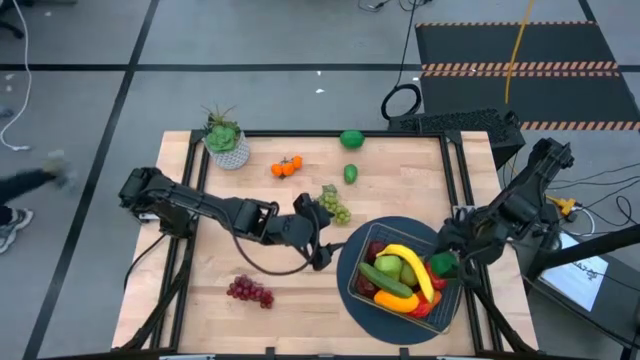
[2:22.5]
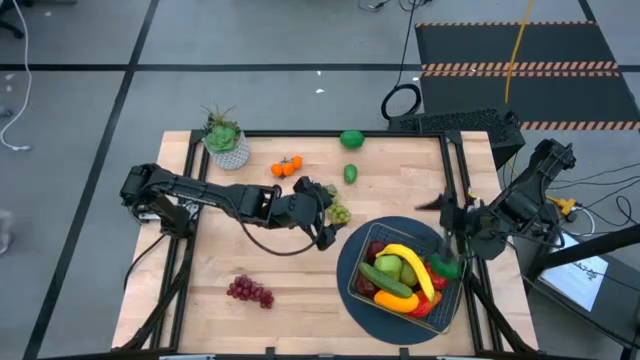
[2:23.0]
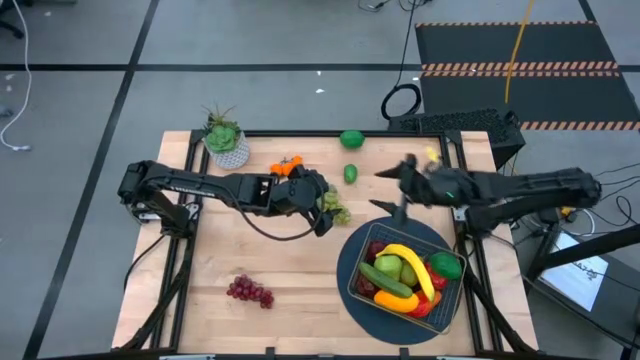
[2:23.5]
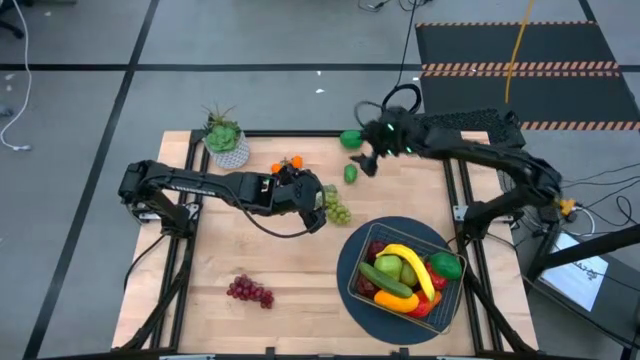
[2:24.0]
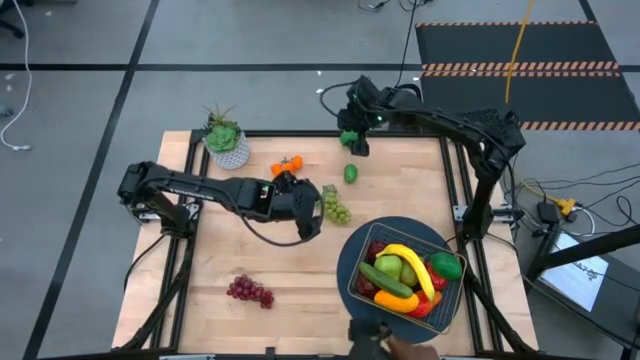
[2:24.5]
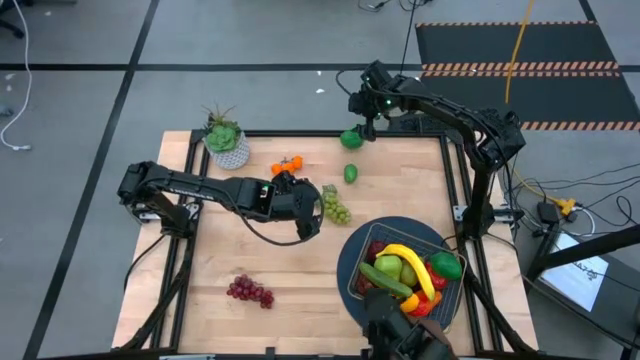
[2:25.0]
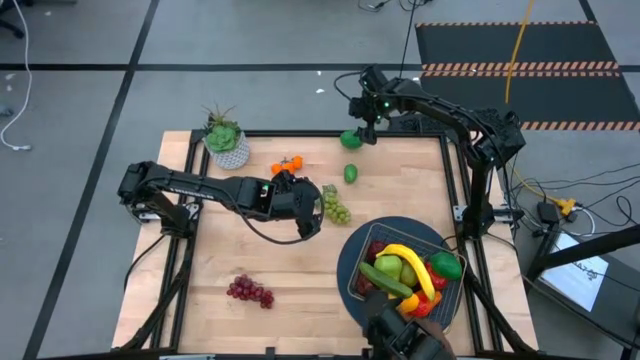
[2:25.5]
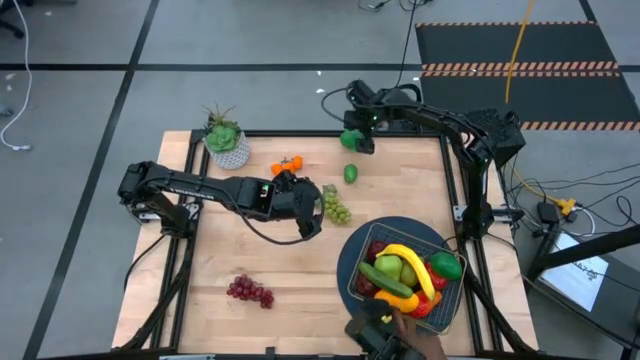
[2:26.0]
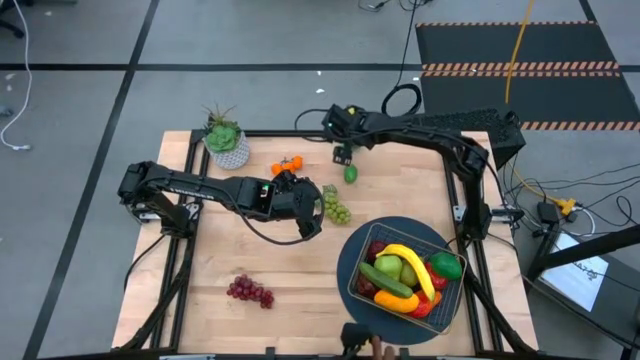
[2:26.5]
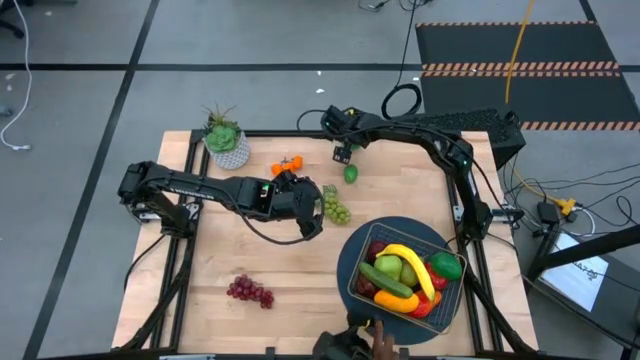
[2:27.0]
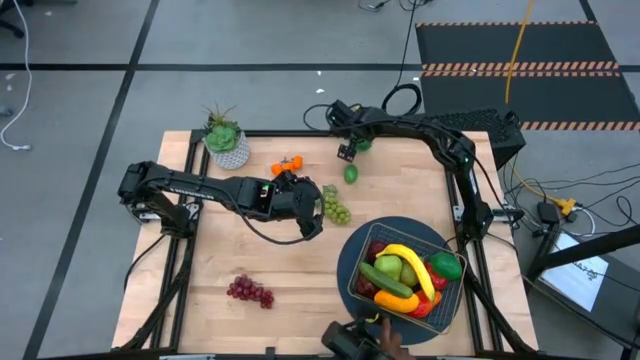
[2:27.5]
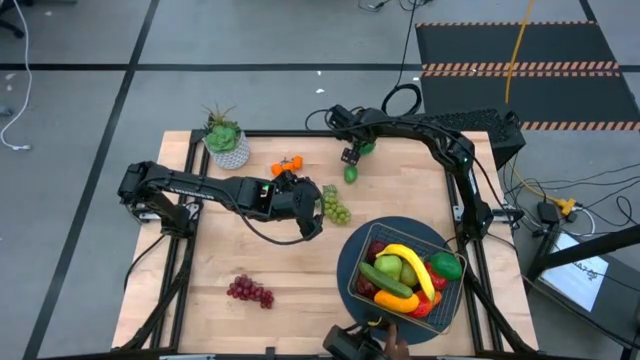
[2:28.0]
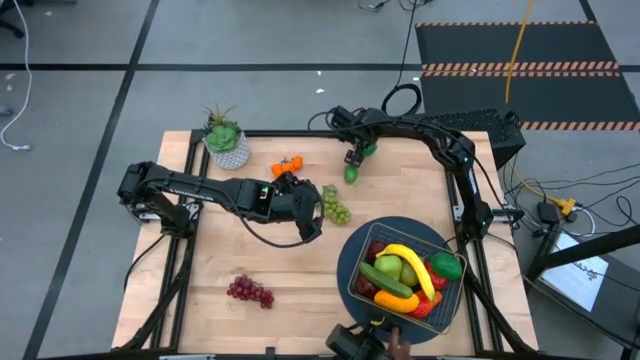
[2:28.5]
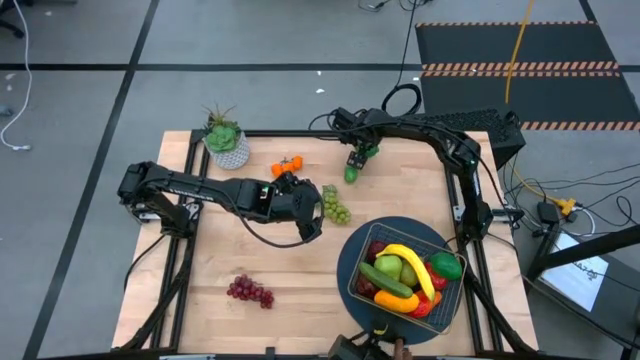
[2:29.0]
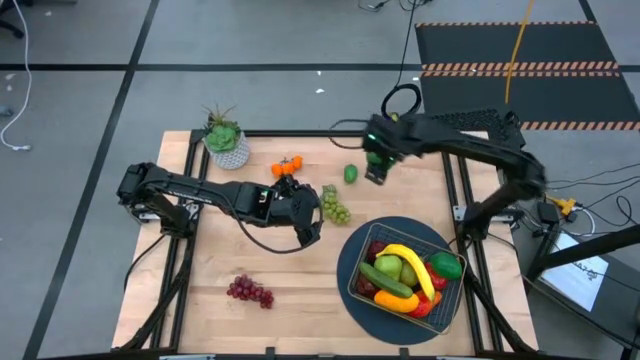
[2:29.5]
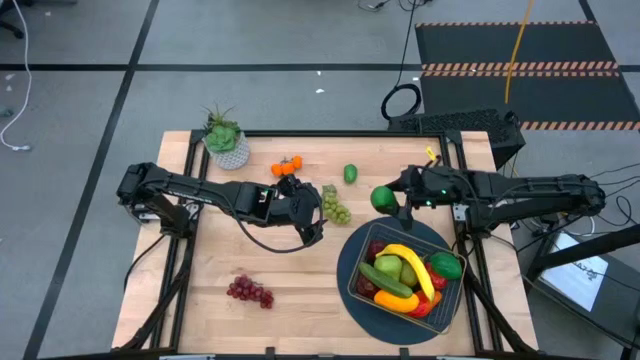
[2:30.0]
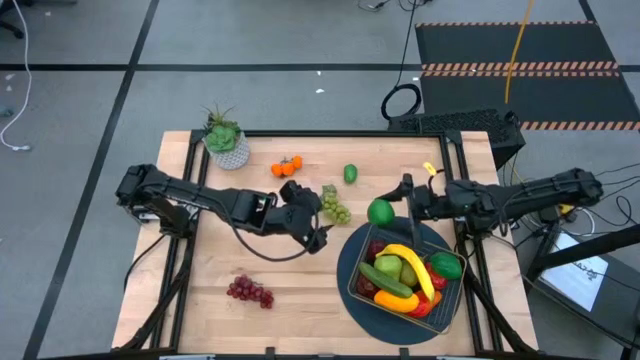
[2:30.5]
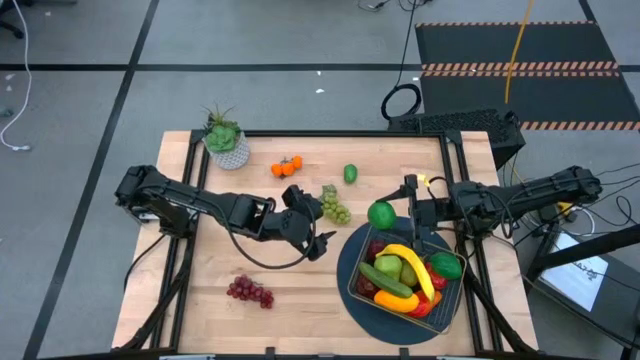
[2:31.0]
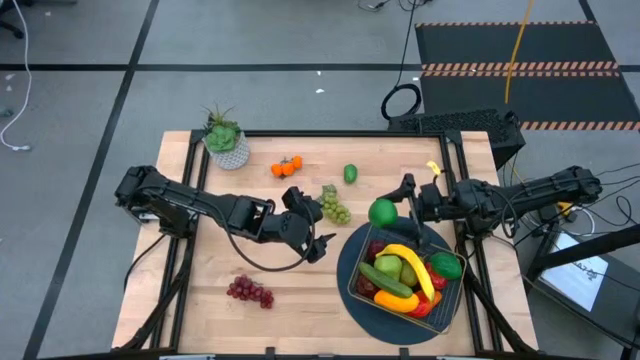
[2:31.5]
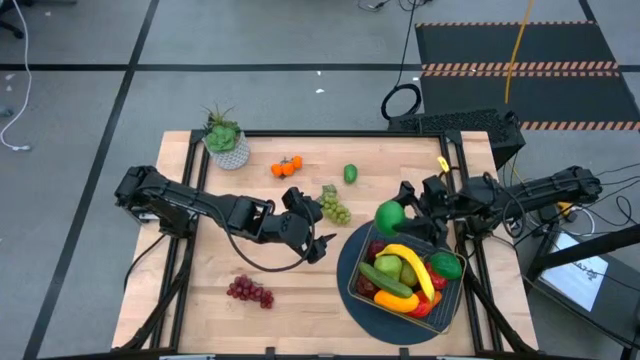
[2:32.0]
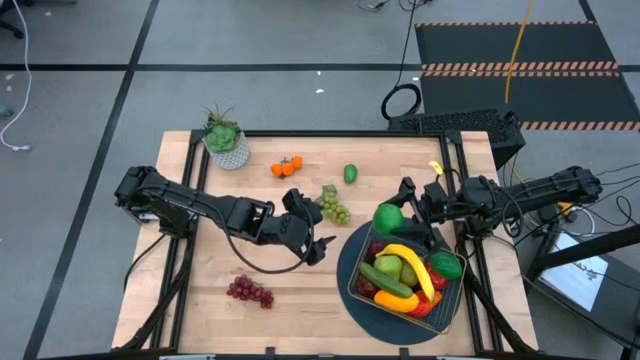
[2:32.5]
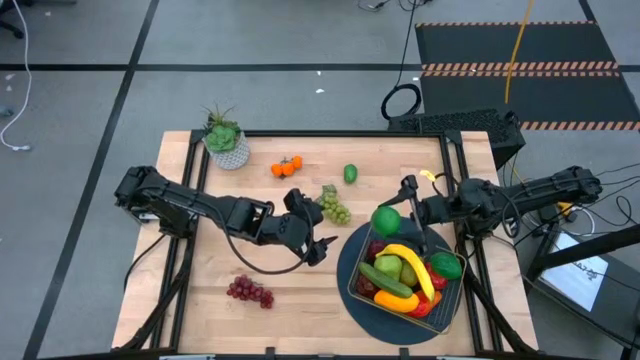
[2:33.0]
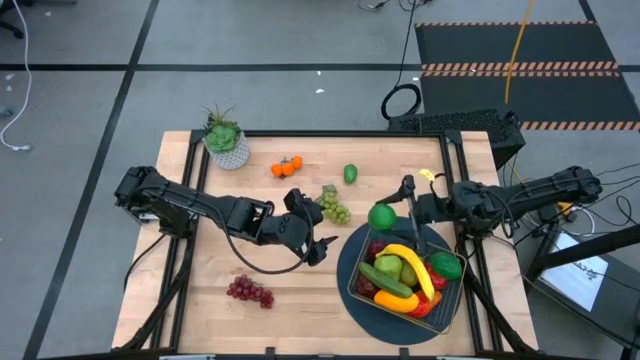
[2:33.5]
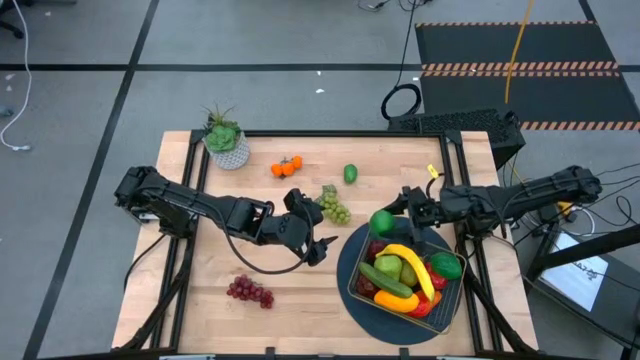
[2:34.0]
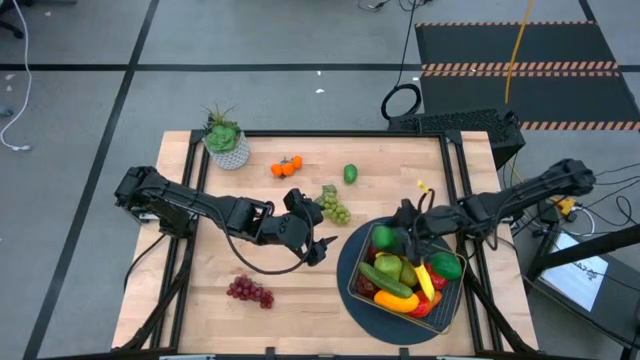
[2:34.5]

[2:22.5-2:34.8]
Task: Build produce basket
Put the top lime into the gold wire basket

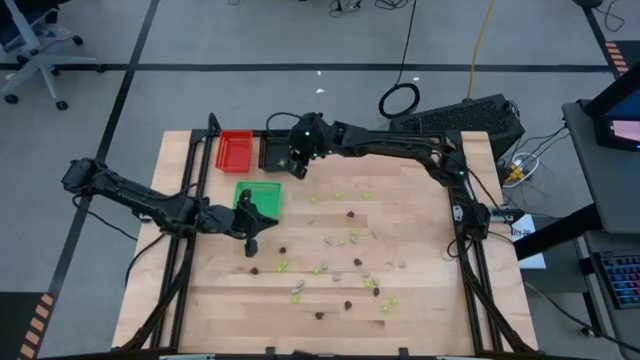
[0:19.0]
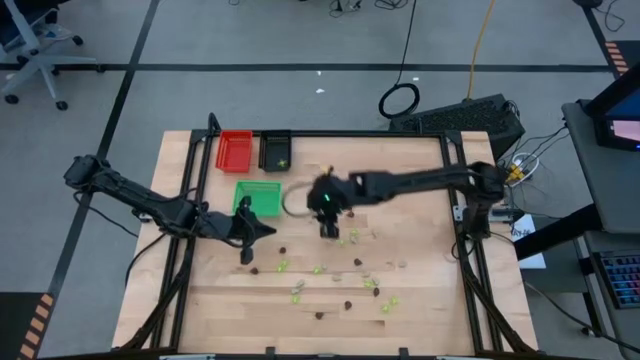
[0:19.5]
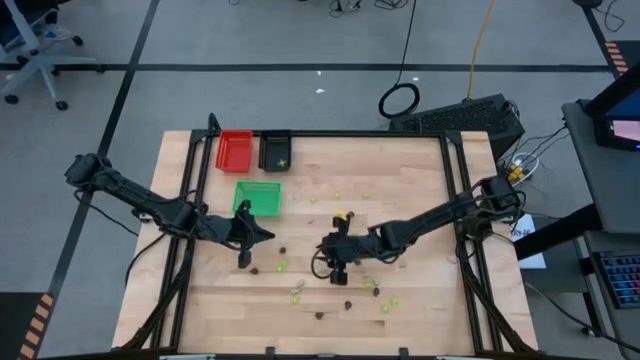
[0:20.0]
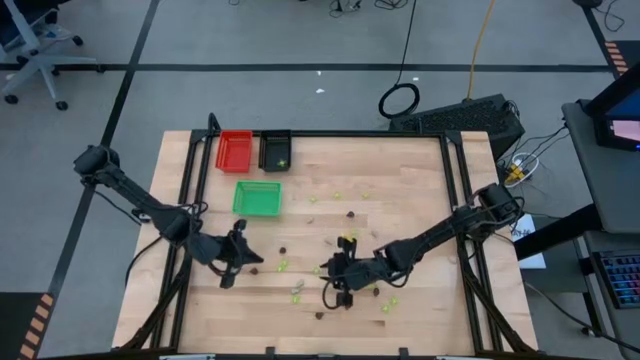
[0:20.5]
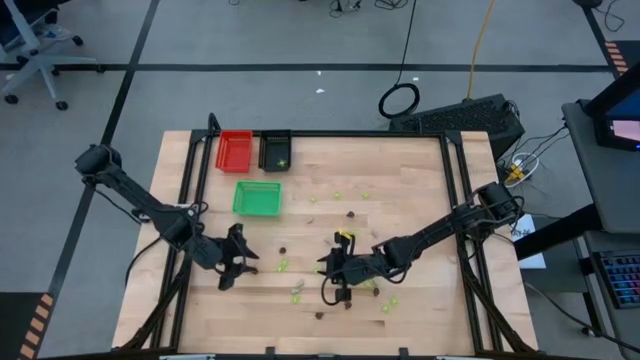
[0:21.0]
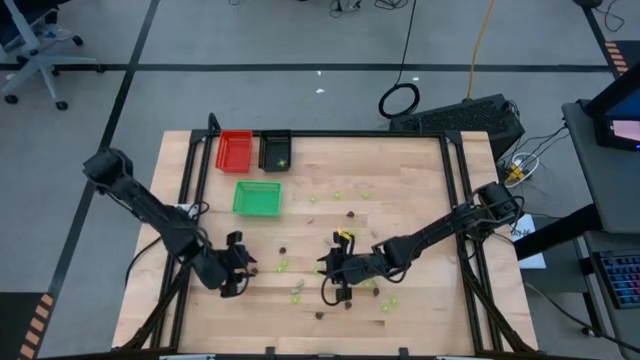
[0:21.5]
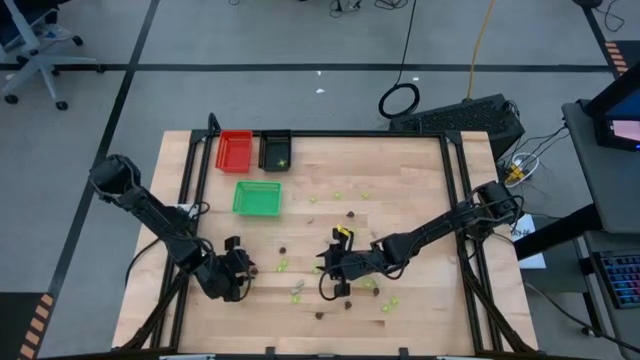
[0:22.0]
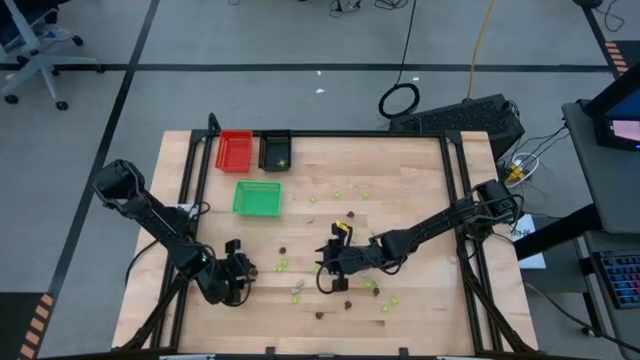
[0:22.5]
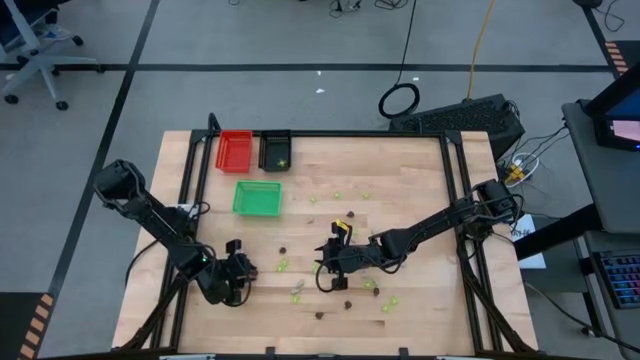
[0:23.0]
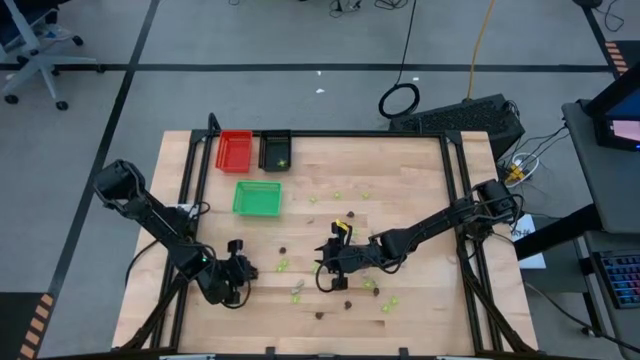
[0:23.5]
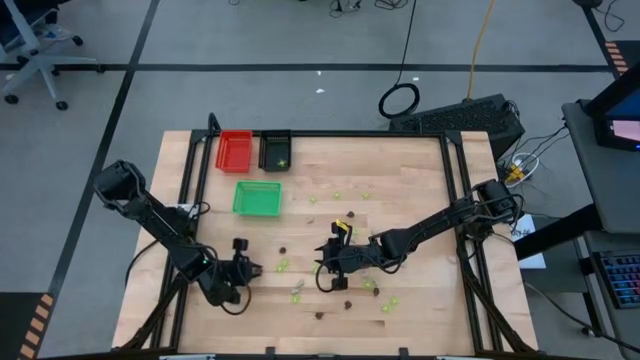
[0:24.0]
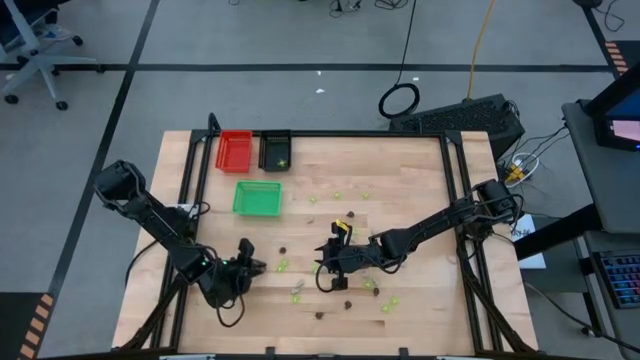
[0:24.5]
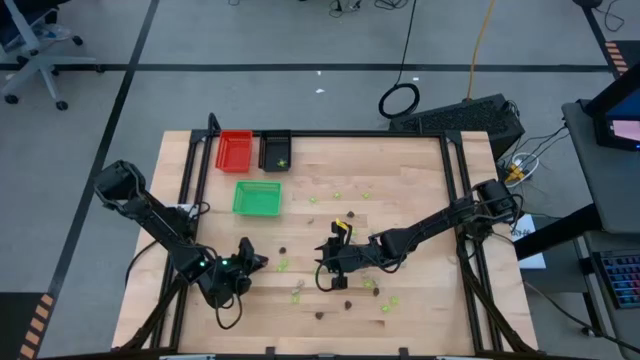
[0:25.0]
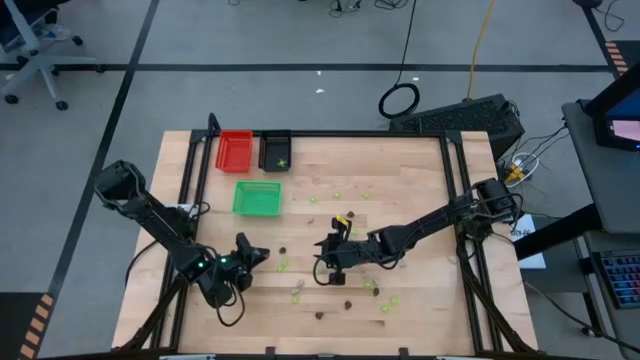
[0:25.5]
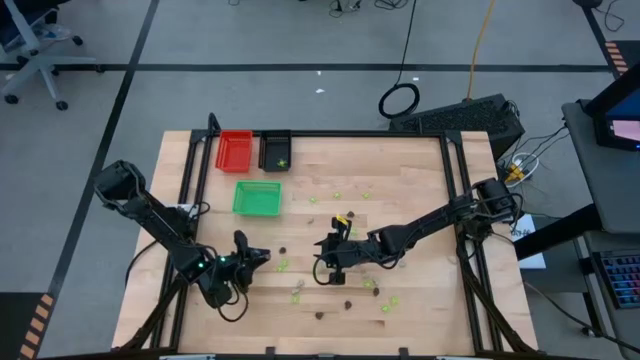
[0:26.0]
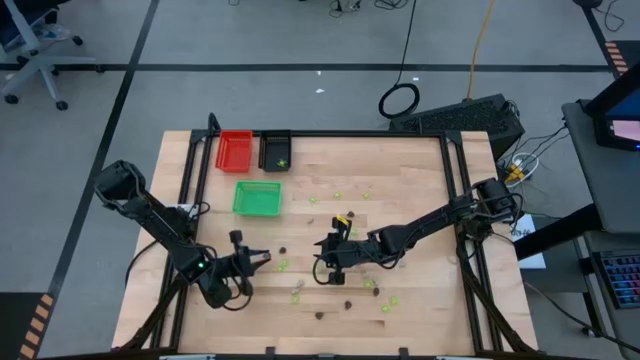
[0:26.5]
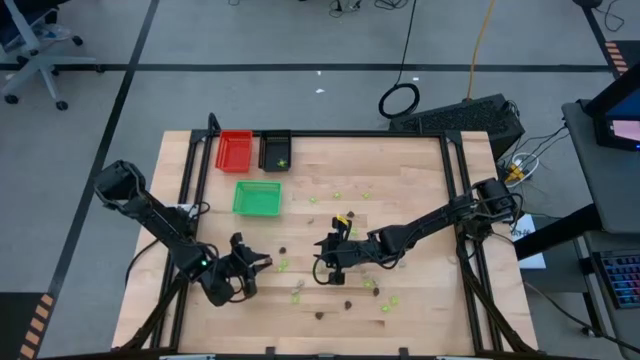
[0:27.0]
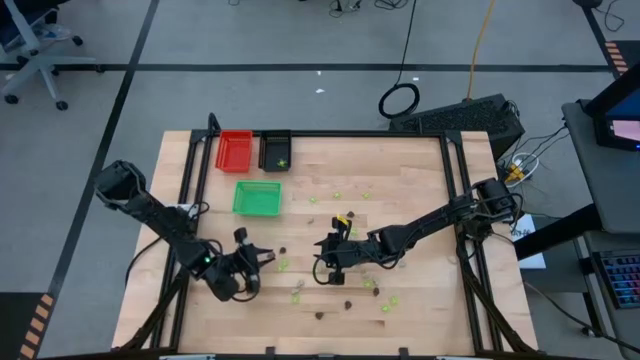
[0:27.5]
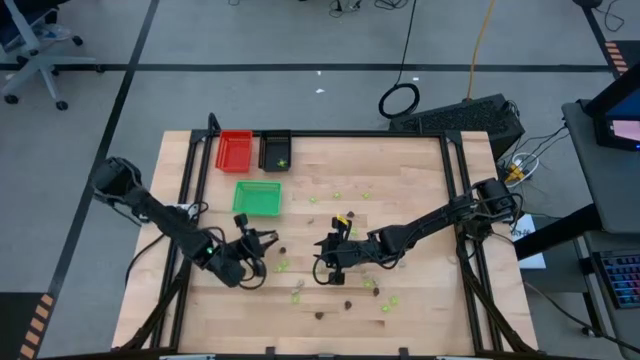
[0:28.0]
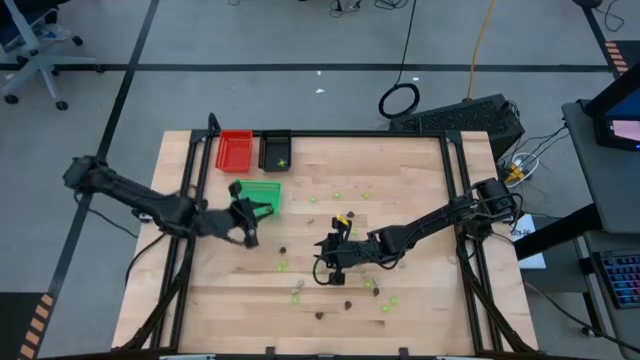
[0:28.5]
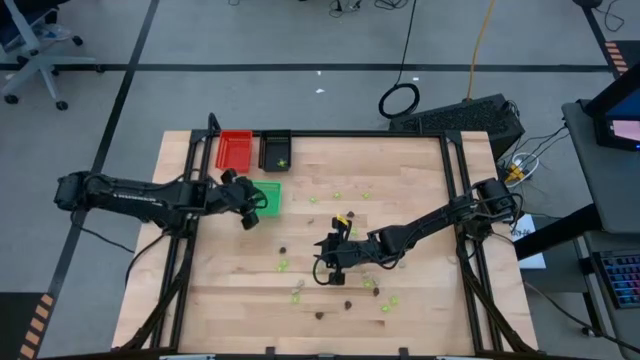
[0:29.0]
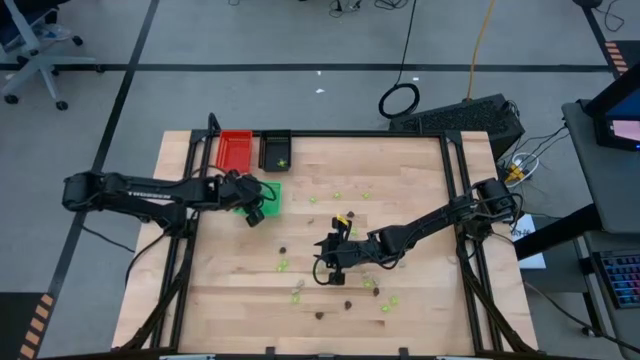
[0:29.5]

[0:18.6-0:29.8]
Task: Sort Halloween decoration
Put the black skull toy into the green bin
